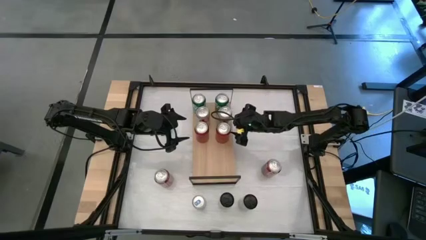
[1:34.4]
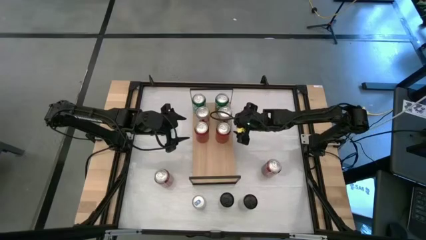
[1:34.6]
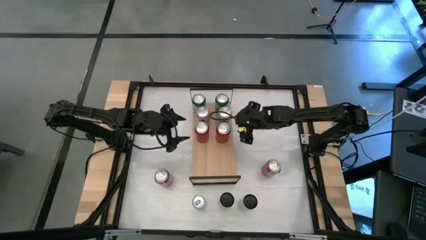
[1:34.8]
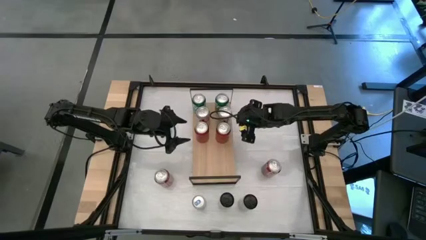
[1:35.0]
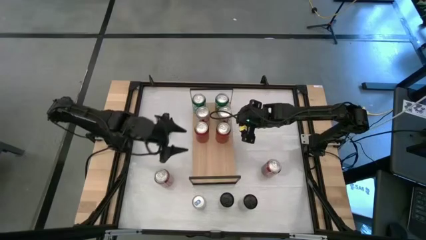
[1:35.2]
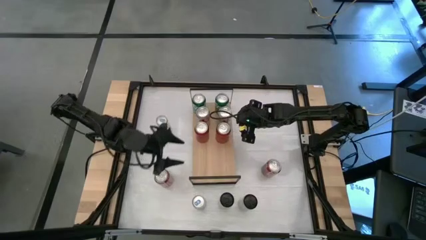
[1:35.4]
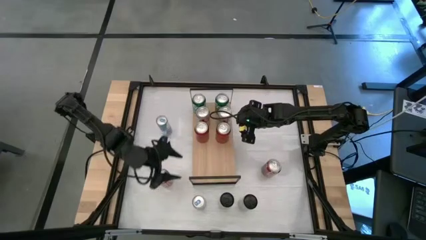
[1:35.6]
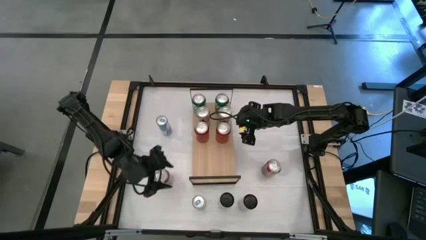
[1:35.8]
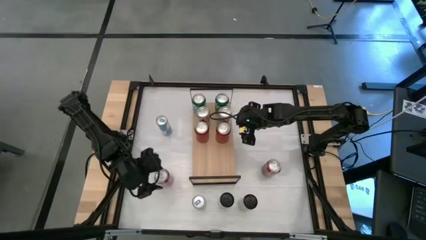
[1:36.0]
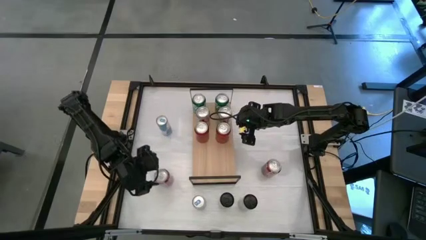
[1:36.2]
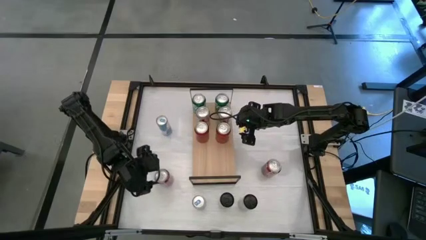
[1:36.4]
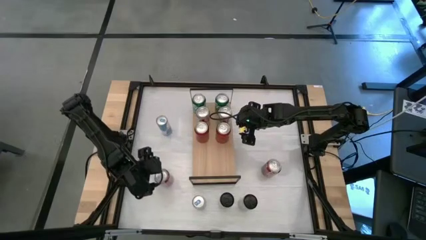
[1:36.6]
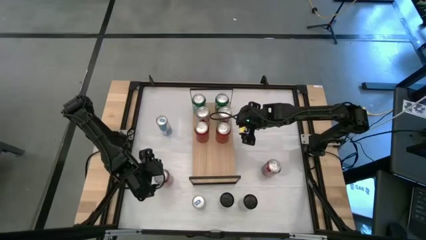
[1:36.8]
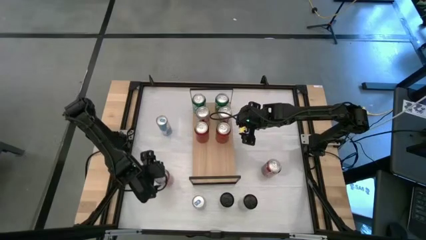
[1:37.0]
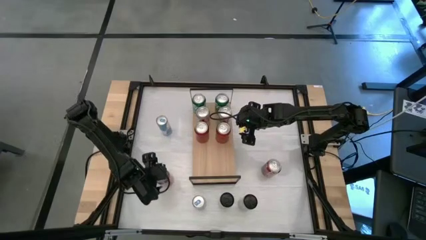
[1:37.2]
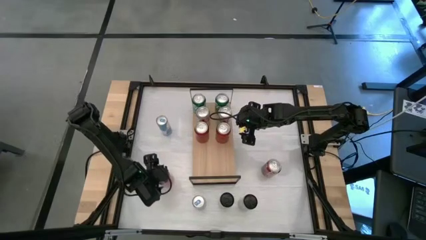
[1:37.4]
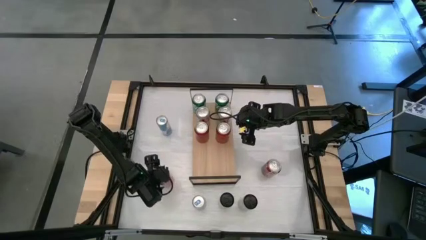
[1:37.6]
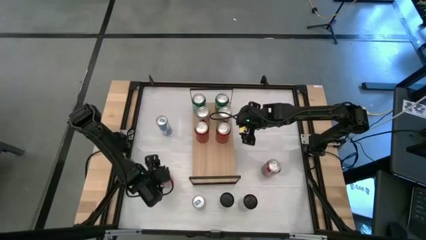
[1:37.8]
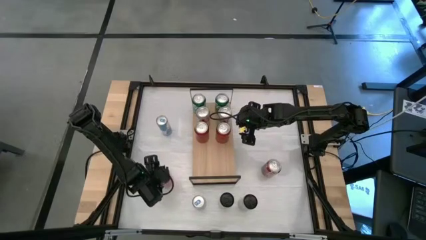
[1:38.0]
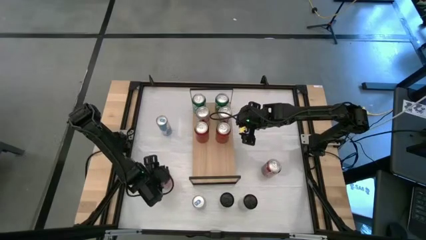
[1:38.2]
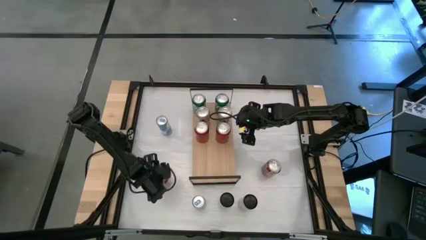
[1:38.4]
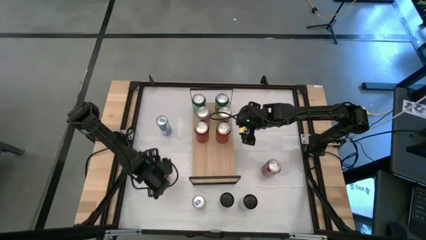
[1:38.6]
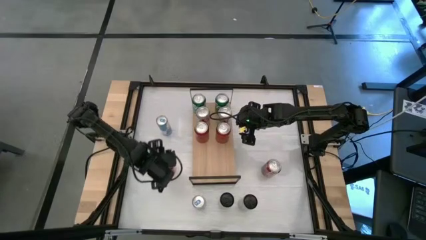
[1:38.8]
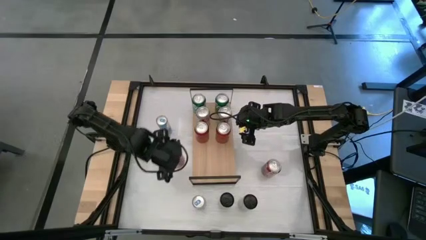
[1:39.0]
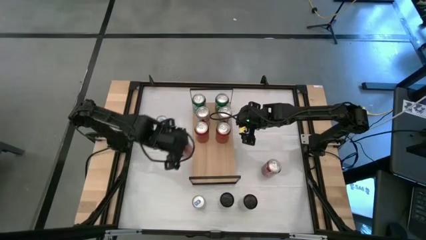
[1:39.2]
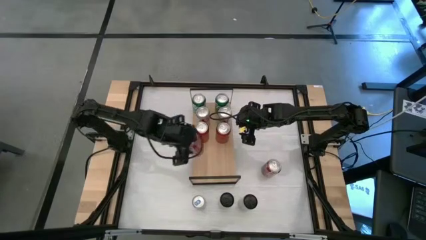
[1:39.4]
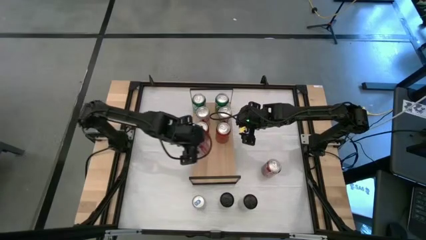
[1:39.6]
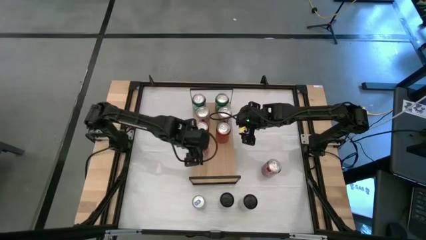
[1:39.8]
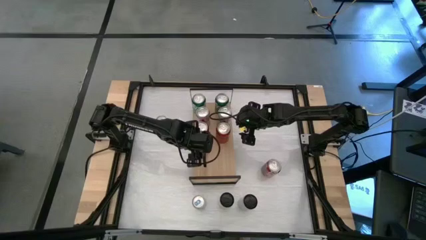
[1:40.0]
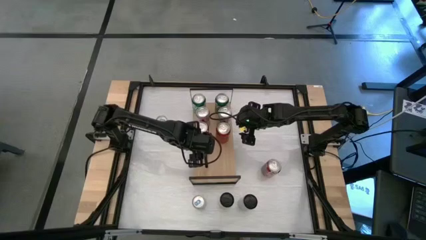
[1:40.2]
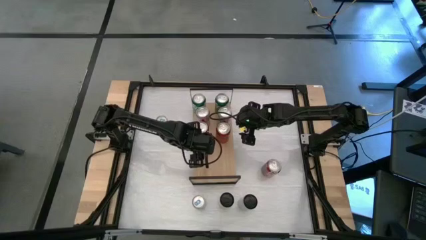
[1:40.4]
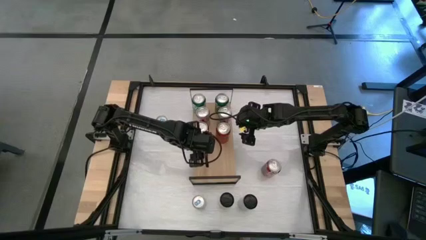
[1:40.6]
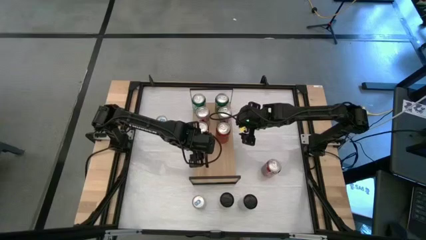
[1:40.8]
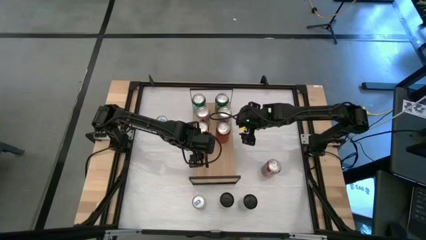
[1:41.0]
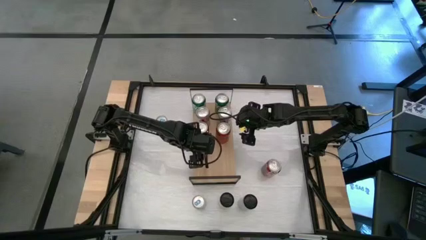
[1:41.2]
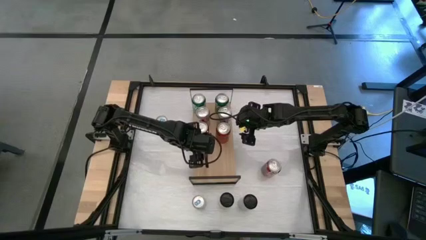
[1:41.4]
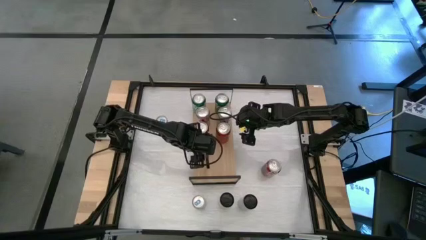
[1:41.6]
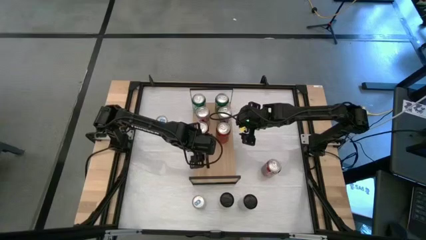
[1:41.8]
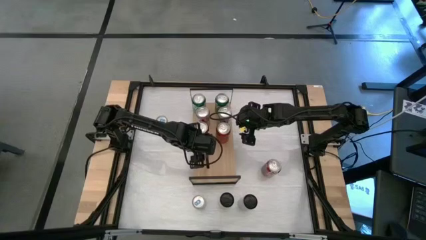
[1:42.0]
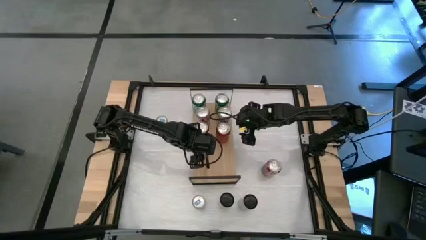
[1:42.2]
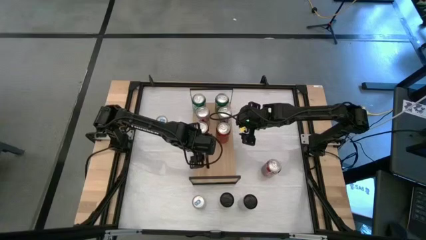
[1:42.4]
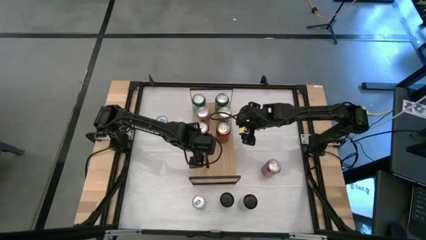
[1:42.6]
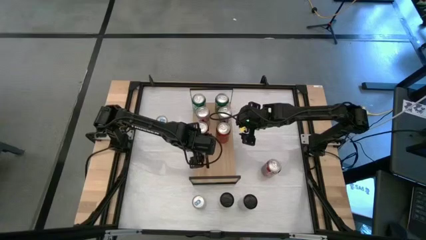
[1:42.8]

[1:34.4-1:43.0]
Task: Place canned beverage on shelf
Put the left white soda can on the shelf

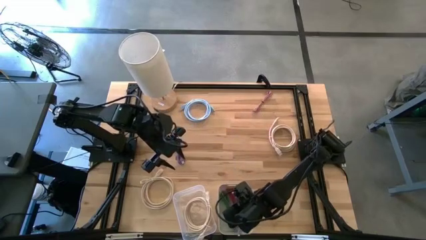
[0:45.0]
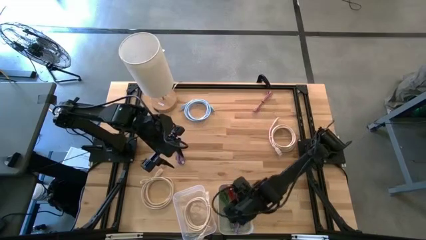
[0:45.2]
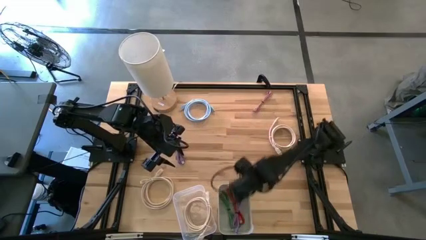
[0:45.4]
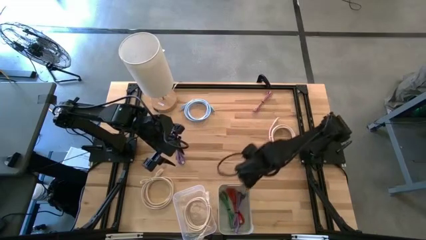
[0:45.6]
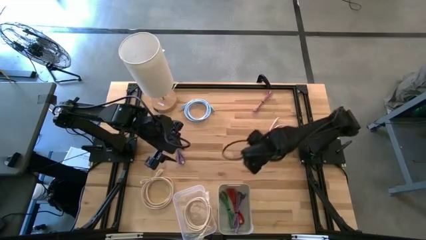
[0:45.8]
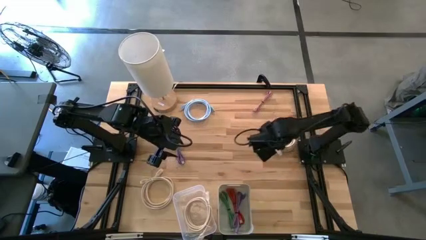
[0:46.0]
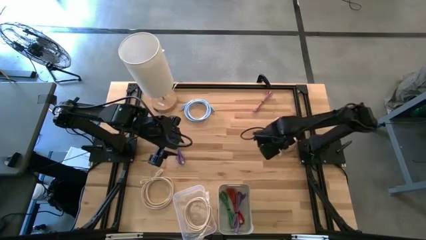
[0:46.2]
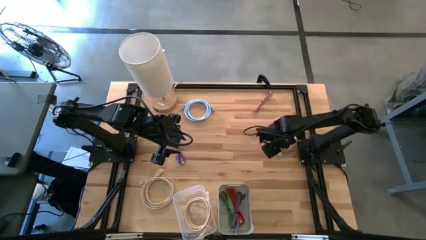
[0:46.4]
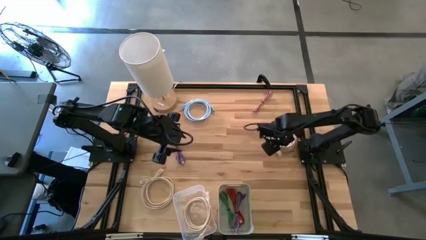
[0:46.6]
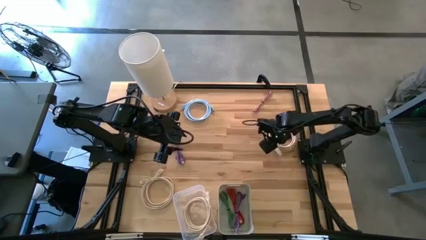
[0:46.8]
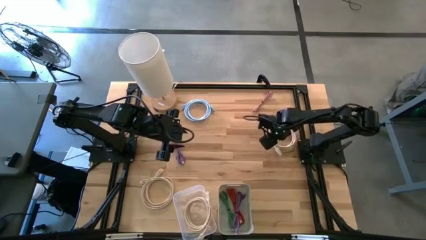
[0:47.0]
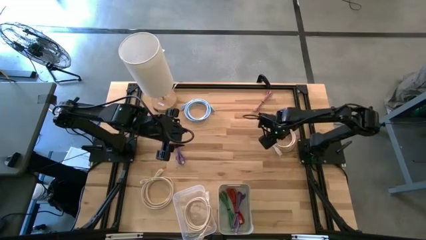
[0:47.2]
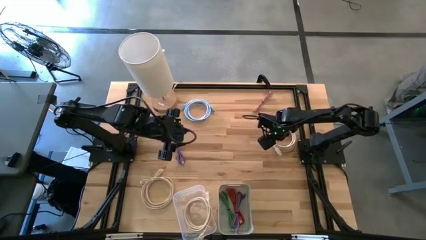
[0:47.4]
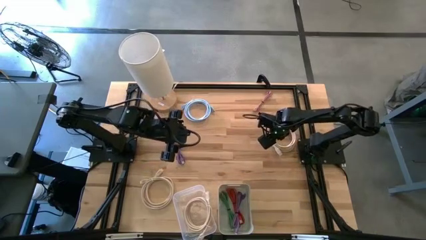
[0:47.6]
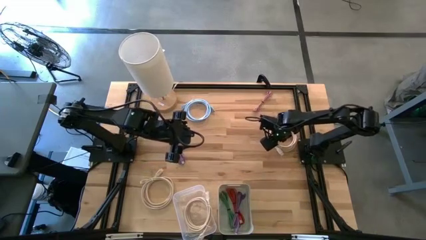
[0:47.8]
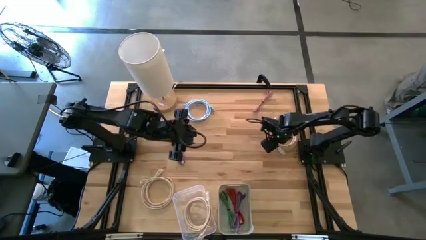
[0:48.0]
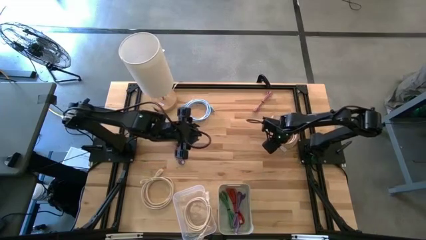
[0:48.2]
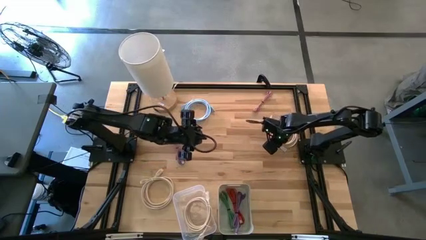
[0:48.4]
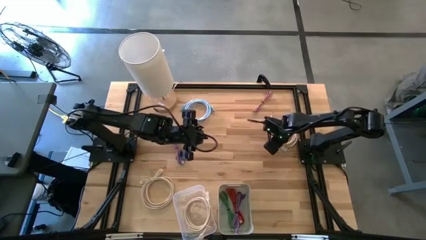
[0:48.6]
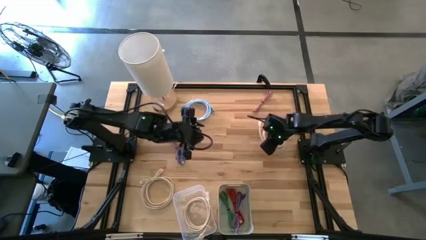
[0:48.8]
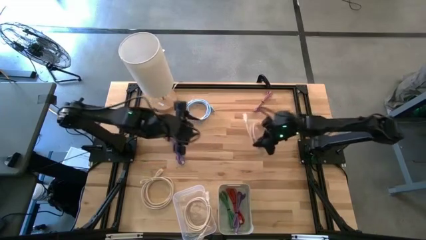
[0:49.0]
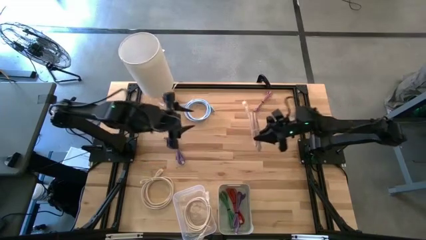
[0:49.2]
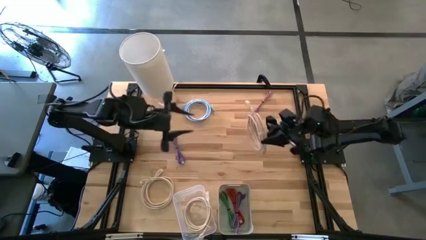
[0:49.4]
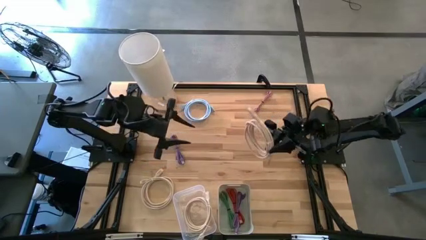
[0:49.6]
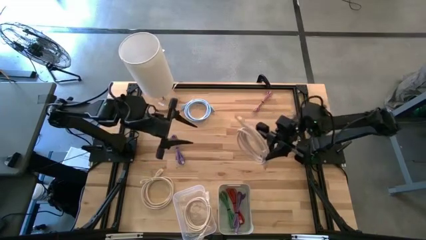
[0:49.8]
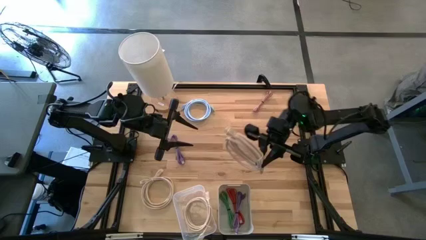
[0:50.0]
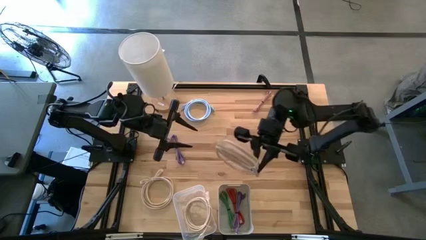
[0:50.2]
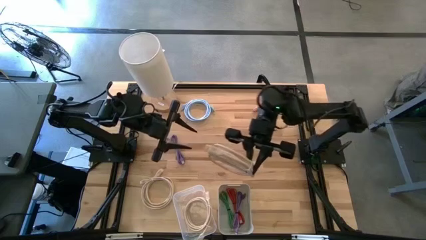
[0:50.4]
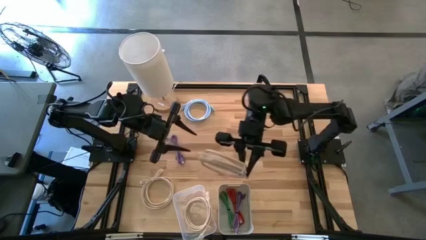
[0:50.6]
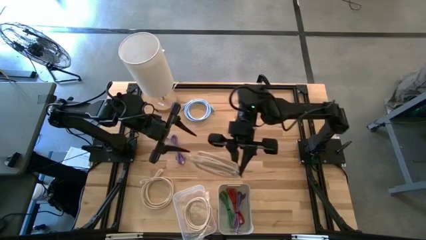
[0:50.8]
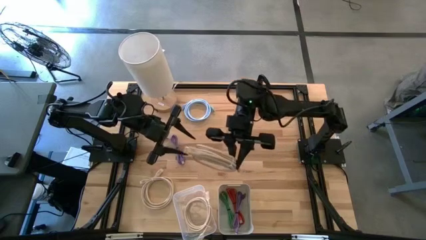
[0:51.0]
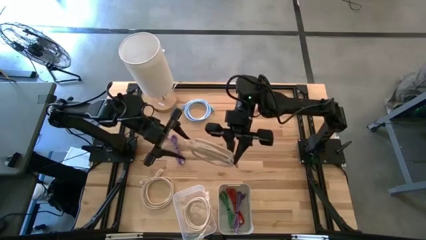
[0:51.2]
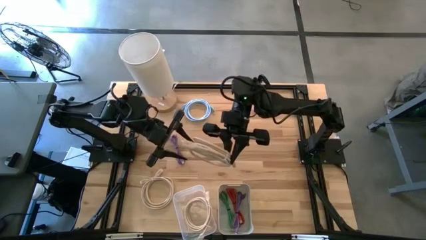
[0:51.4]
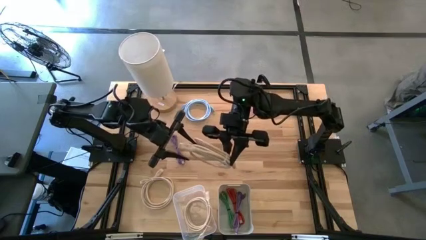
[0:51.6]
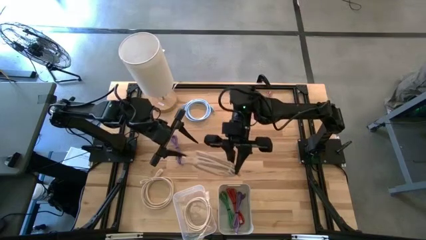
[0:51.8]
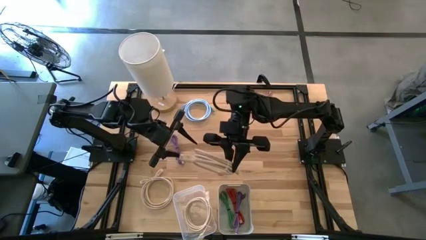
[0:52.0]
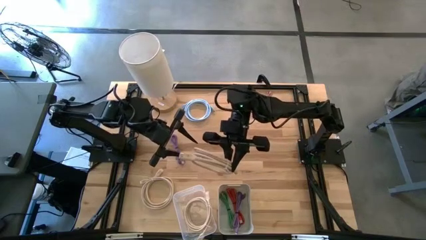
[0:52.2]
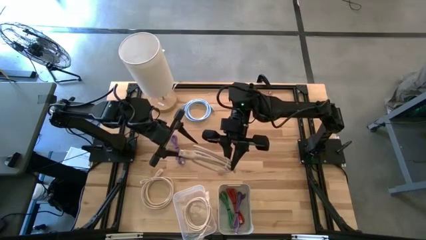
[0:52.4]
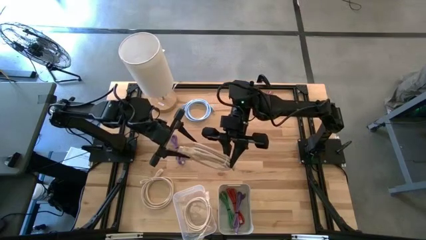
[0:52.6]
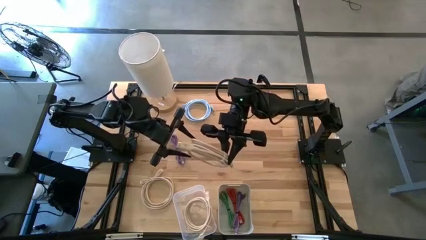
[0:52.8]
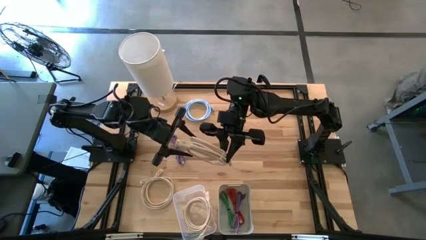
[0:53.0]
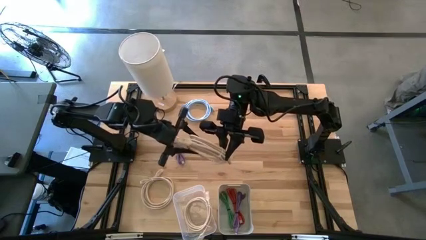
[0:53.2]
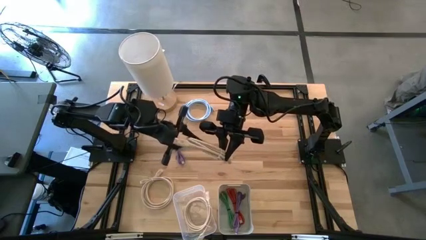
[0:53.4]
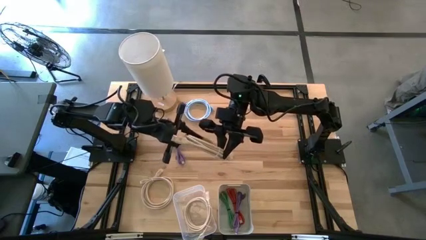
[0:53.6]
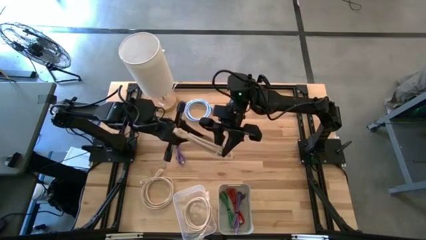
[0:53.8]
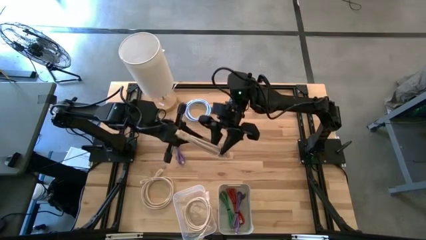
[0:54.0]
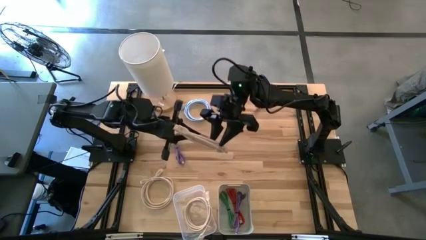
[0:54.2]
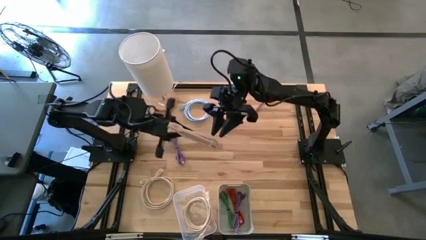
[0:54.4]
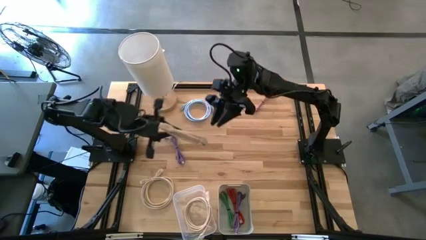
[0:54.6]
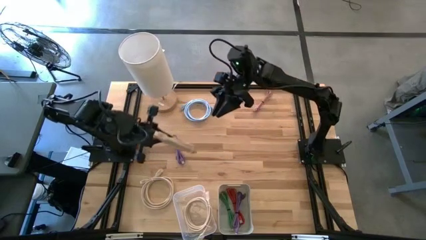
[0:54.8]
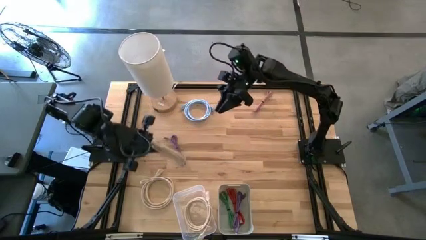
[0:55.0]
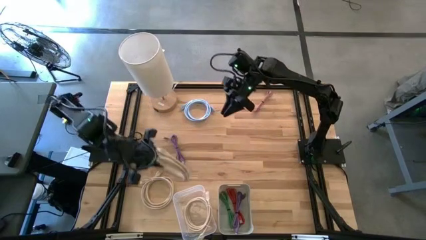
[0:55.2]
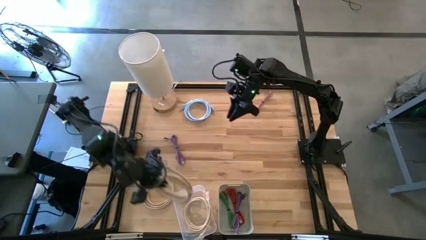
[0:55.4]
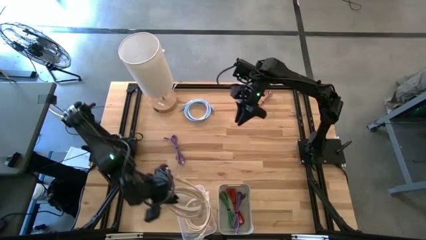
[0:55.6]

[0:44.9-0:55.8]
Task: Pick & Place USB Port
Put the top brown HDMI cable into the transparent bin
